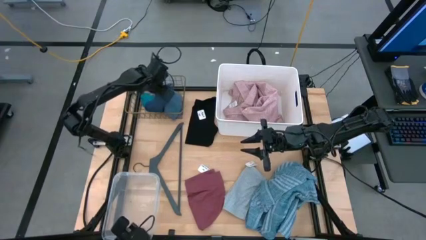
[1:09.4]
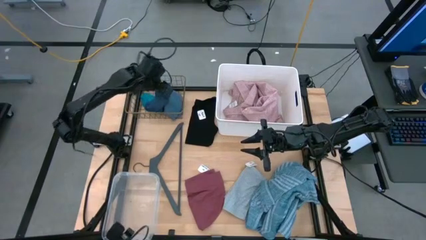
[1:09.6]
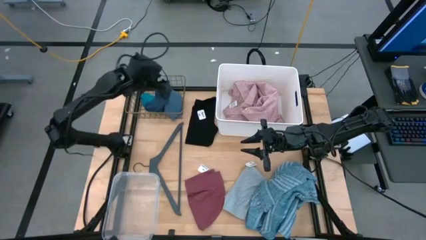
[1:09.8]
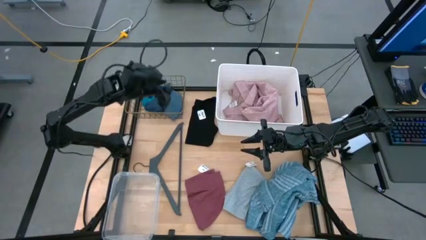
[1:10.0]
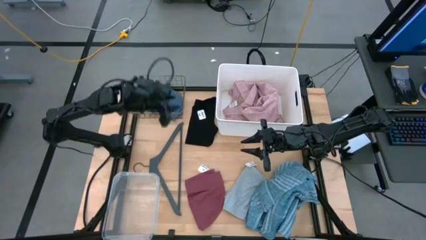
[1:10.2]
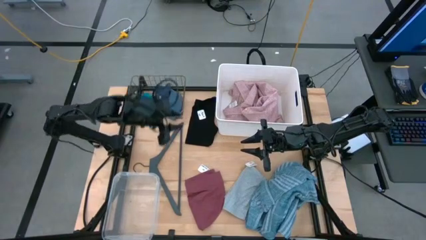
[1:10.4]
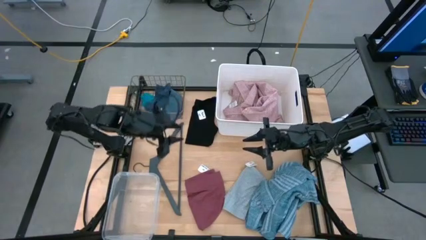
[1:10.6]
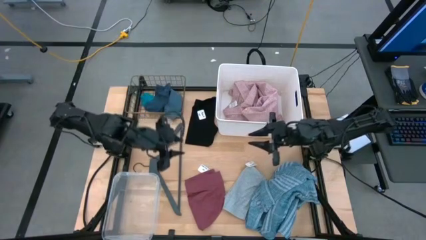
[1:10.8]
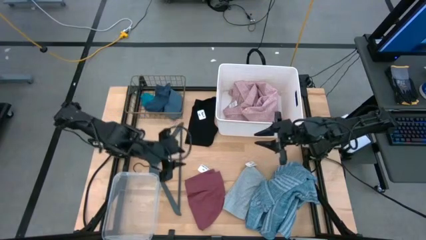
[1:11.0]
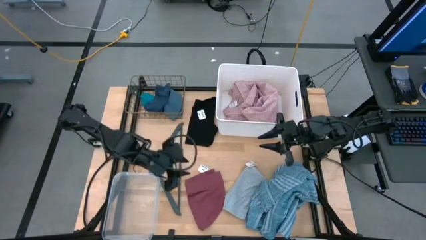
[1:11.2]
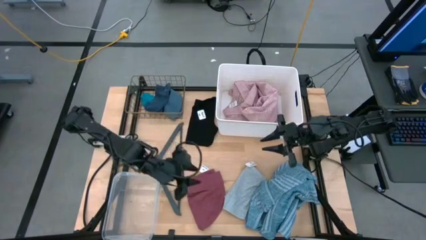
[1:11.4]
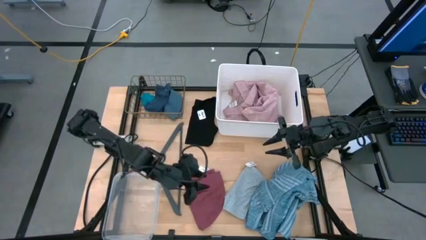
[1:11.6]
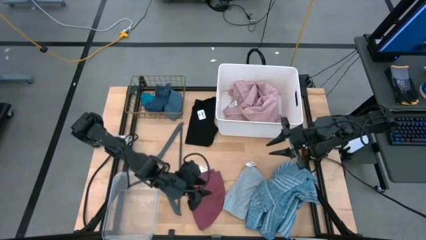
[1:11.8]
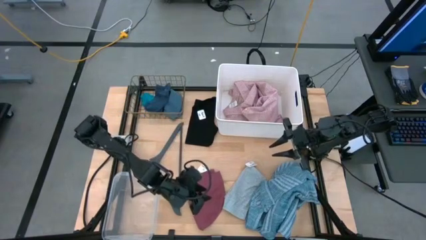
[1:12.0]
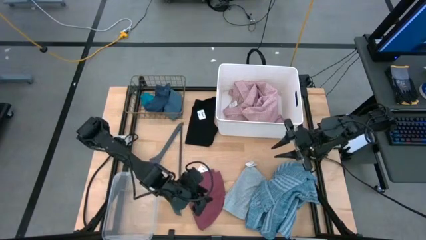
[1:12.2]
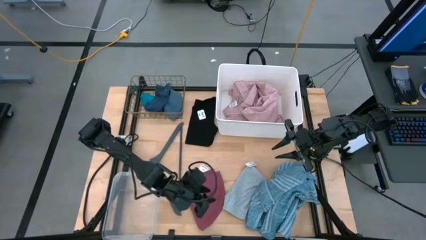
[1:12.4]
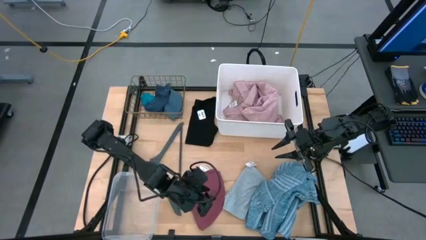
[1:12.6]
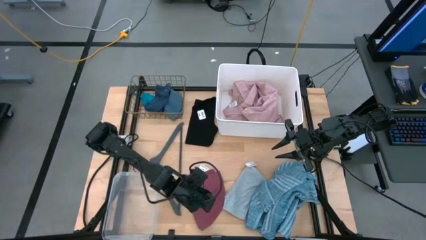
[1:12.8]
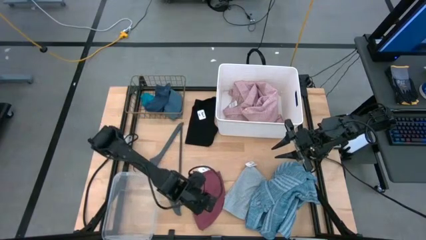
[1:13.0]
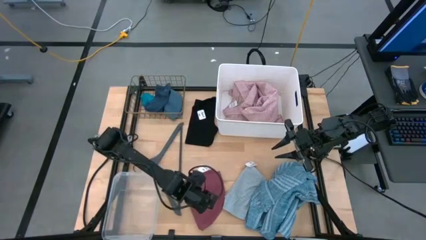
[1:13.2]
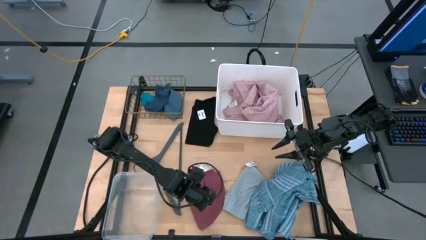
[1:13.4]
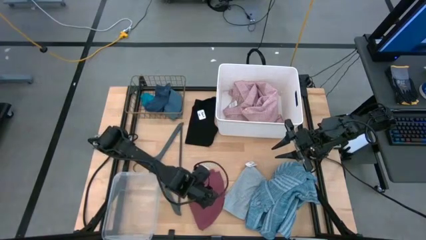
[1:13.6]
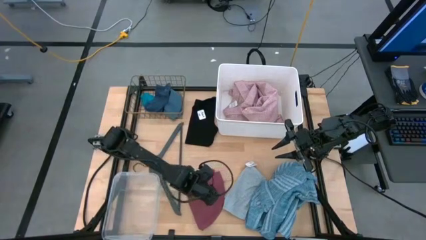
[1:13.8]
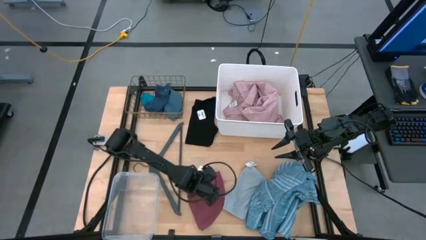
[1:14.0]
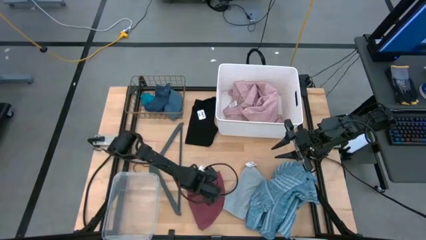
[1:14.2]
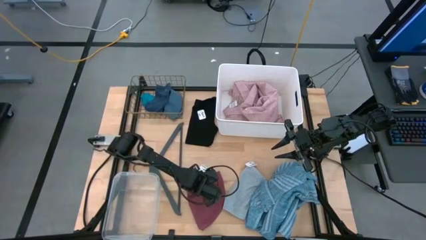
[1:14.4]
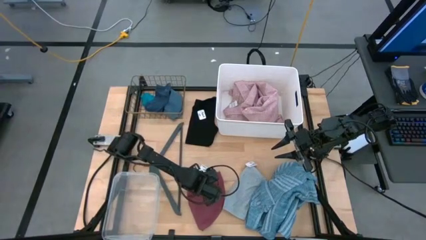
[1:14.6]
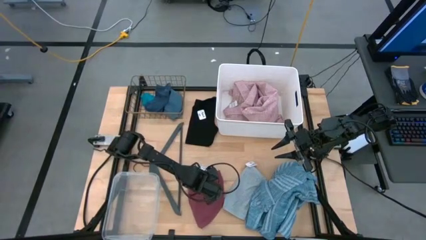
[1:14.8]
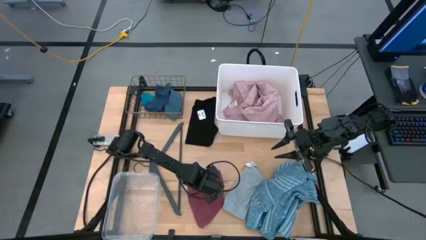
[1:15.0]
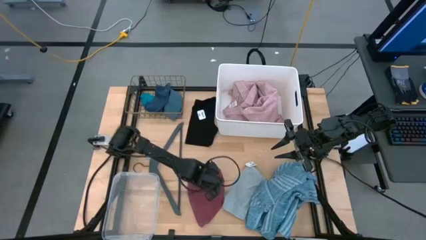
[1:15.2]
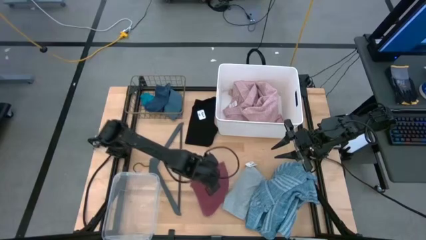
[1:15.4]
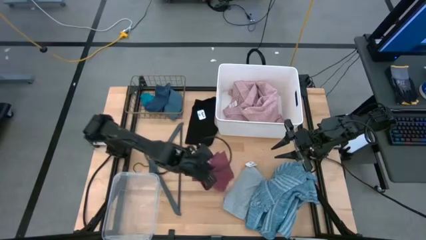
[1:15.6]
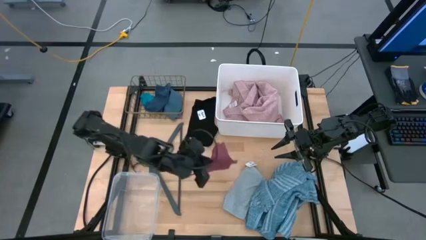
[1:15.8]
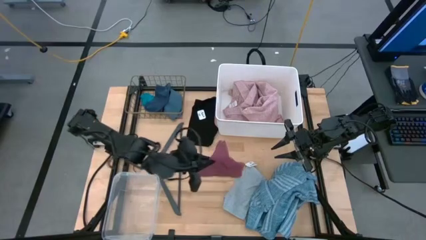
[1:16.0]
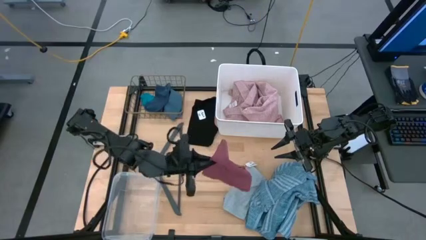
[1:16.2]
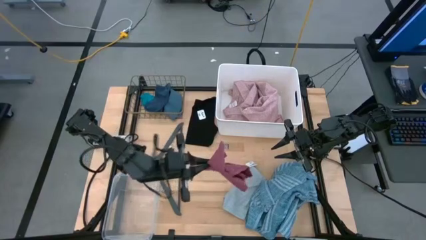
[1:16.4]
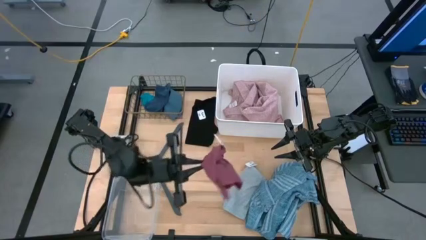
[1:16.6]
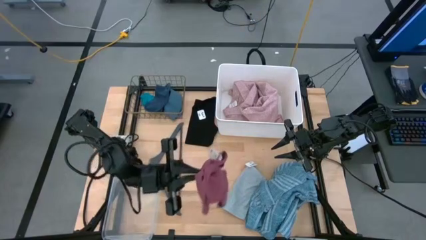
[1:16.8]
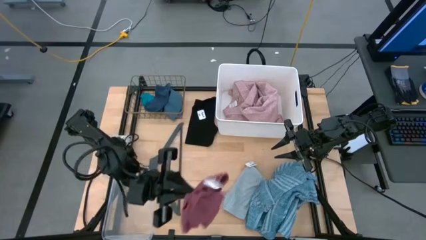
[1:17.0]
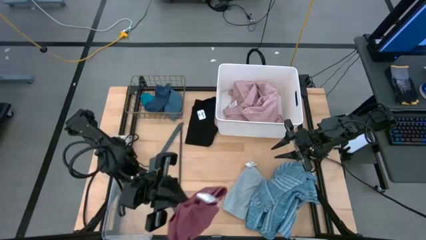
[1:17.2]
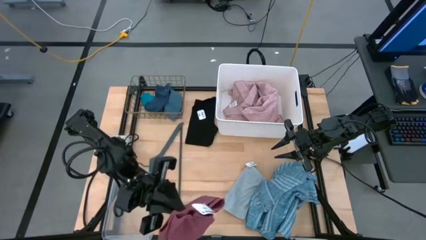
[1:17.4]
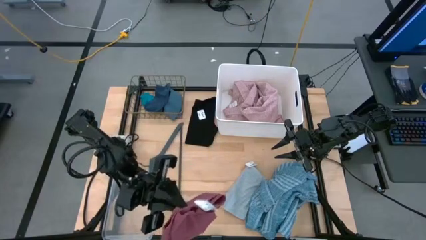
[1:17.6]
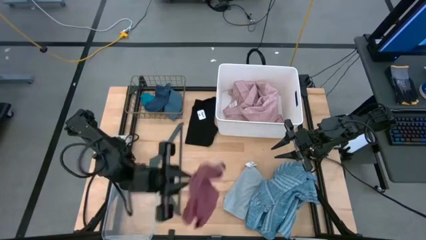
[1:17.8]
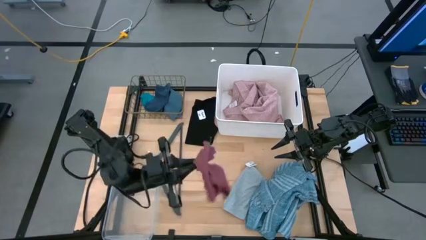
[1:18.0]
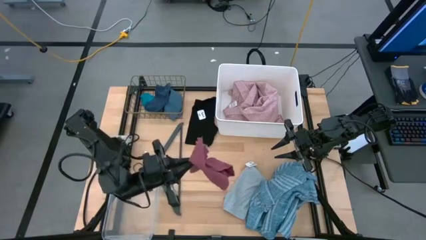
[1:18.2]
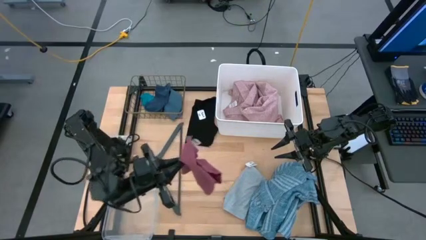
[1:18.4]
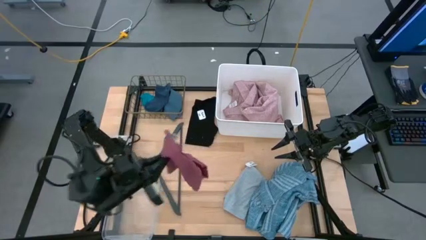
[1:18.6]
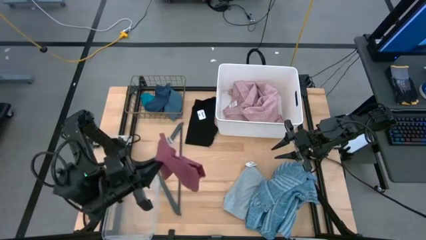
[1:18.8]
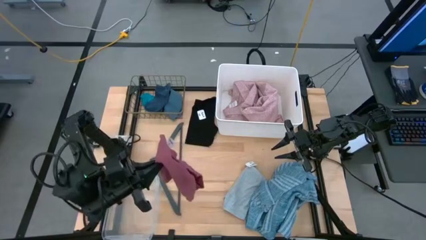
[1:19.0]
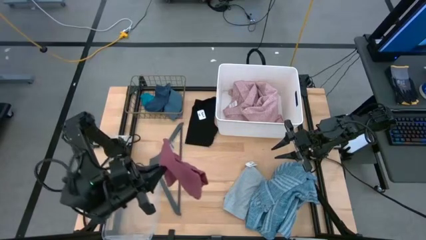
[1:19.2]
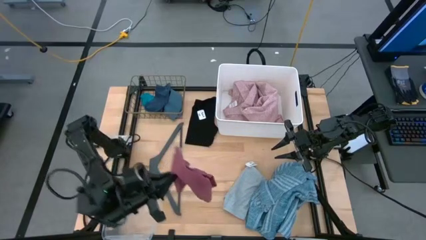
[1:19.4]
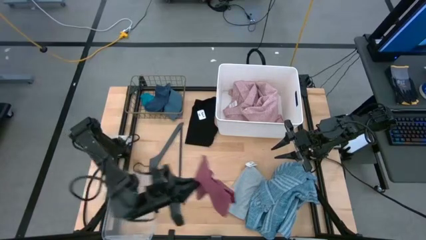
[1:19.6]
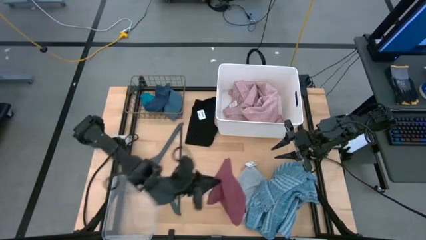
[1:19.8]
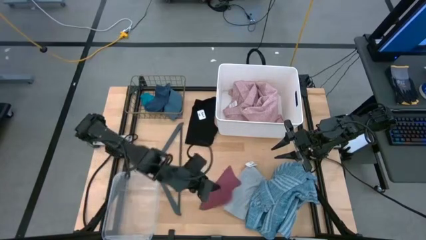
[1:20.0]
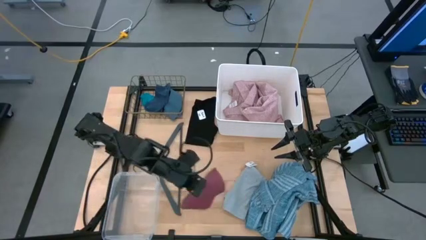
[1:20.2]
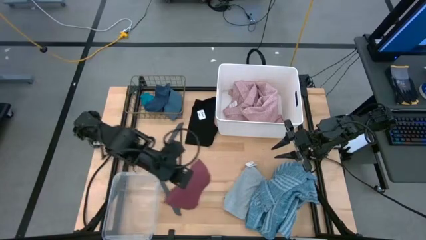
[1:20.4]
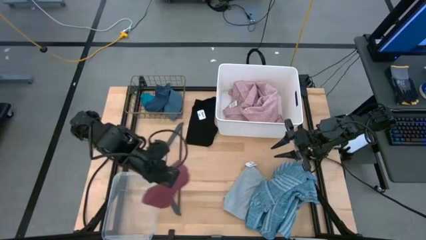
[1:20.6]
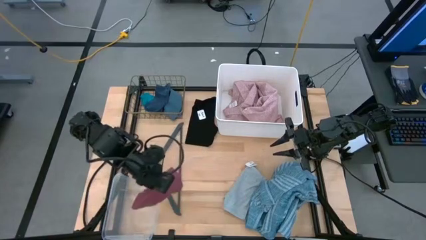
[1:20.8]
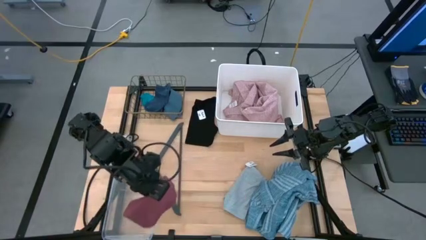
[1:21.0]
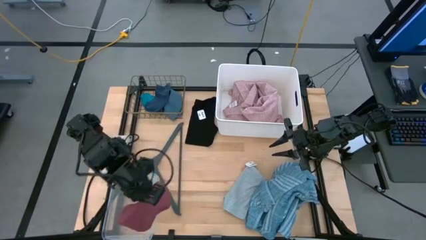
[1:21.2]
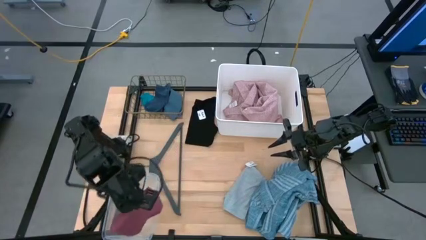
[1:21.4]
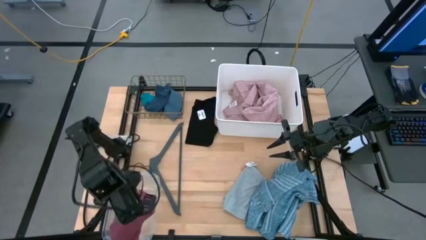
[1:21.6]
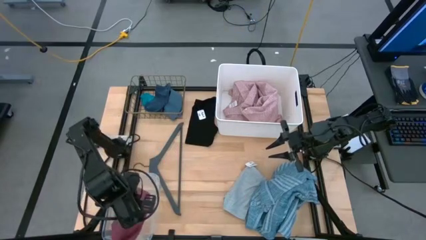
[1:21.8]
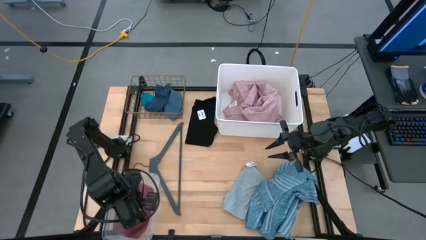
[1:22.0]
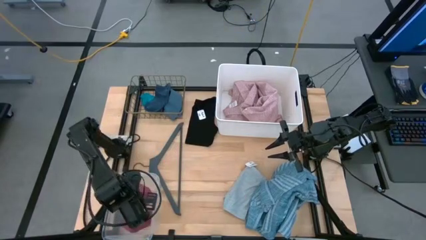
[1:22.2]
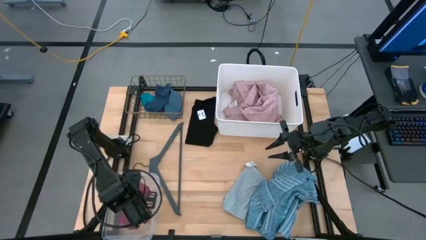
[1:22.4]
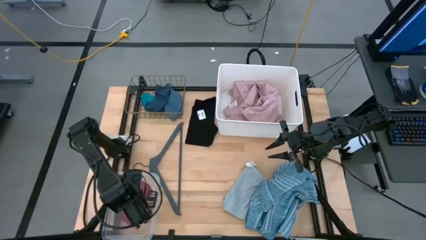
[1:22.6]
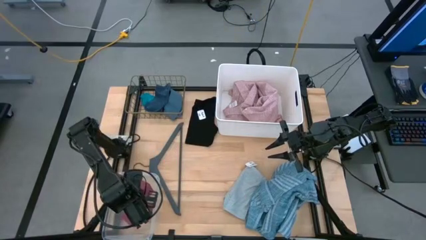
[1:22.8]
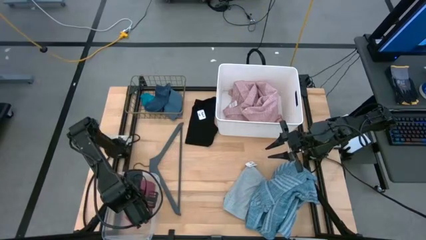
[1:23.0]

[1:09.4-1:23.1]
Task: Pick & Place Cloths
Put the dark red boxers in the transparent bin

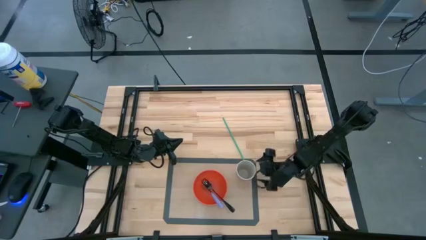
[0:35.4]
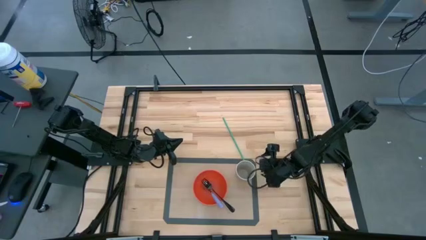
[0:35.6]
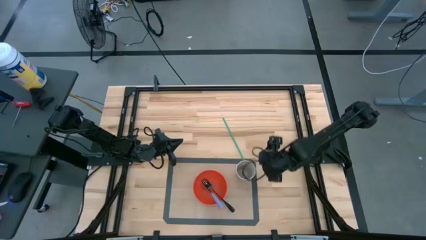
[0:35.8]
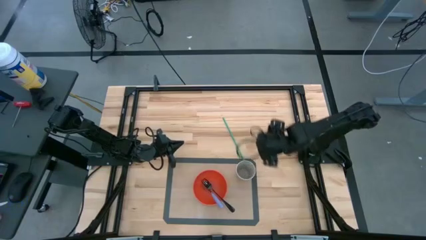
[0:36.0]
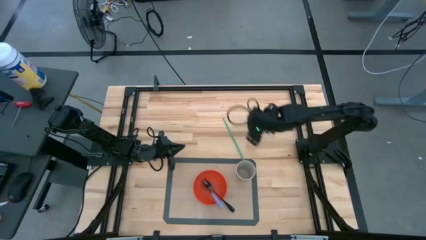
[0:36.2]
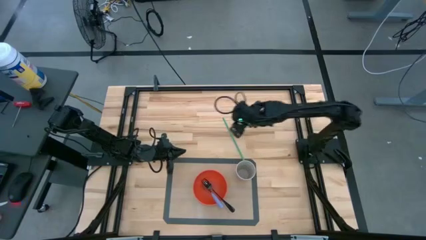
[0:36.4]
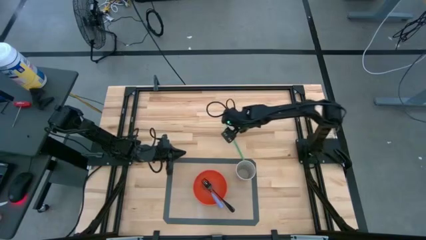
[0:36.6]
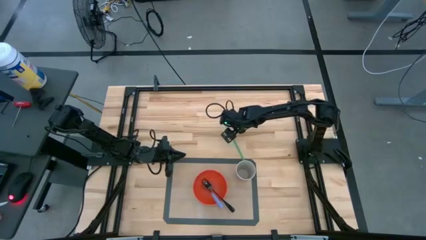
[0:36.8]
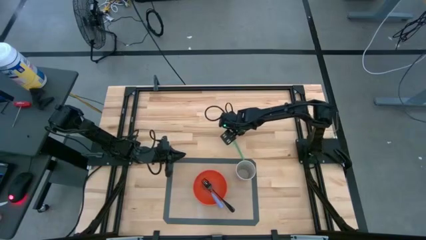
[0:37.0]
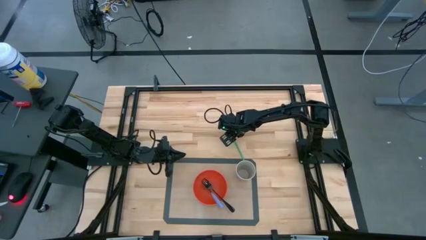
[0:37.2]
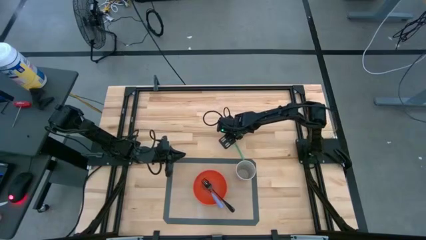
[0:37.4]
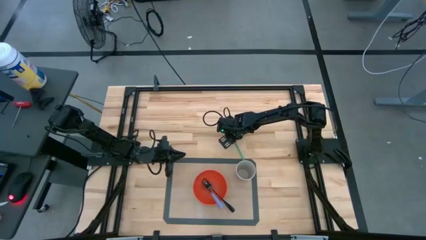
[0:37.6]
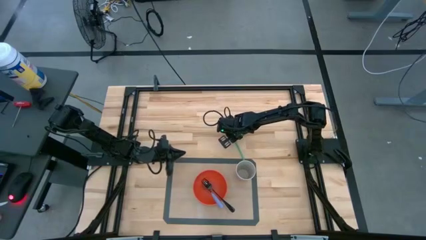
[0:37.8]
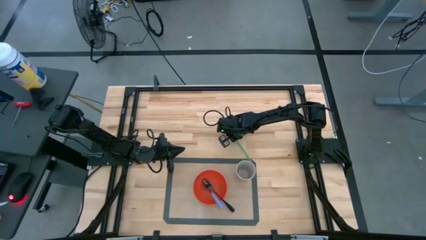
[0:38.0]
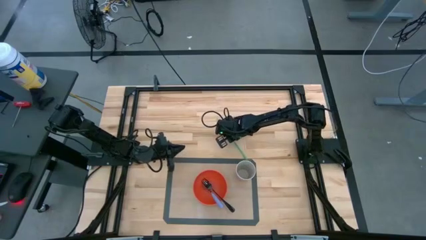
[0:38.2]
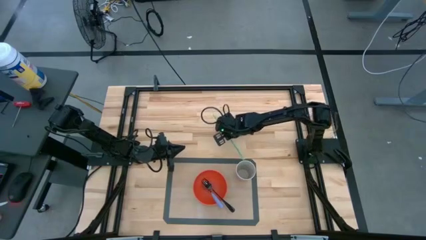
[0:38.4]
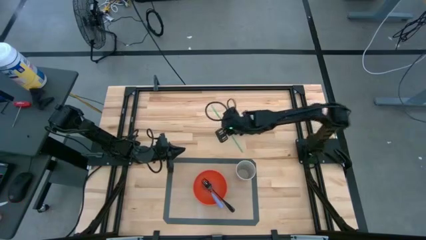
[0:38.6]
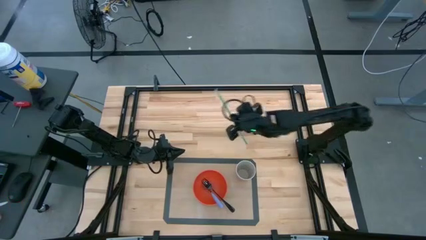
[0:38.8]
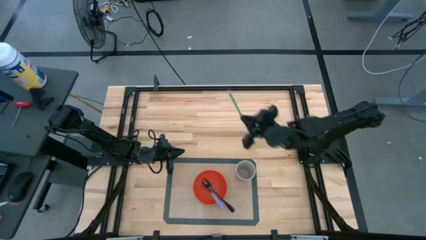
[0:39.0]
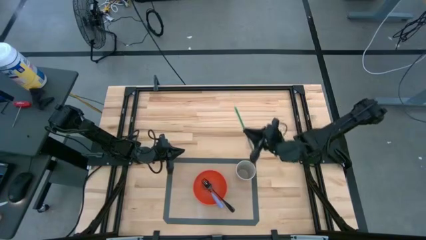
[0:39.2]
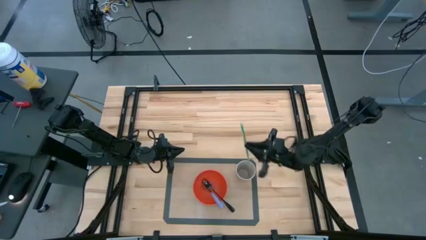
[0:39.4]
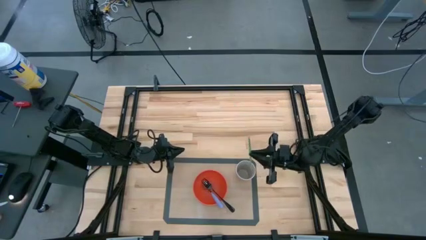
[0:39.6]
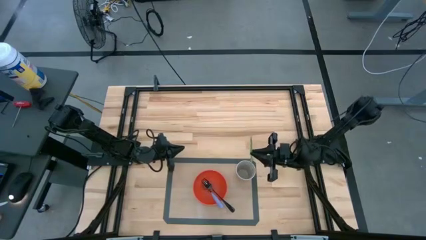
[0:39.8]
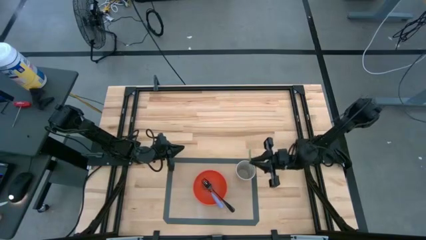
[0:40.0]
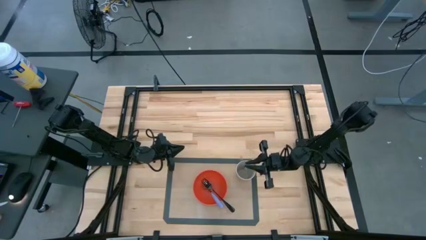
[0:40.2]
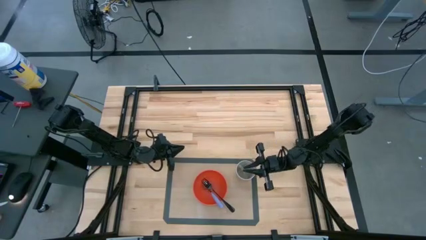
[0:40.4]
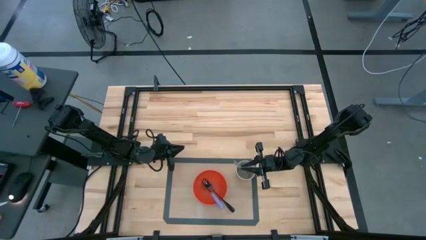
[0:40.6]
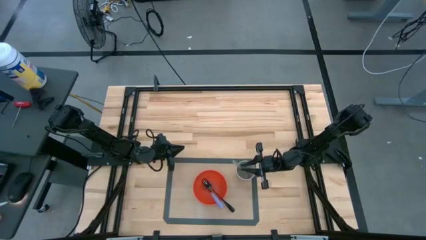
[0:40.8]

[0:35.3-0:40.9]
Task: Pick & Place Utensil
Put the green drinking straw into the white cup on the transparent mat
